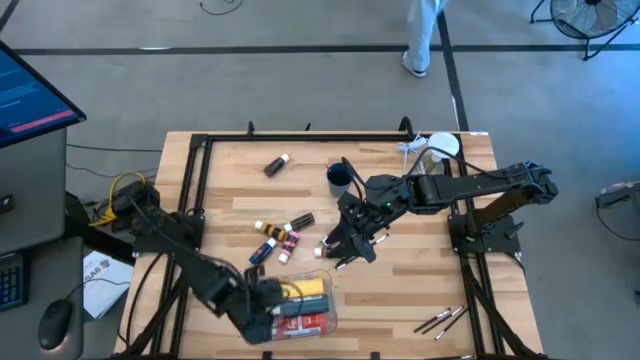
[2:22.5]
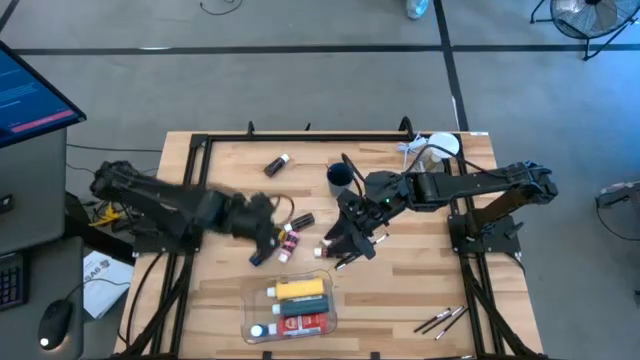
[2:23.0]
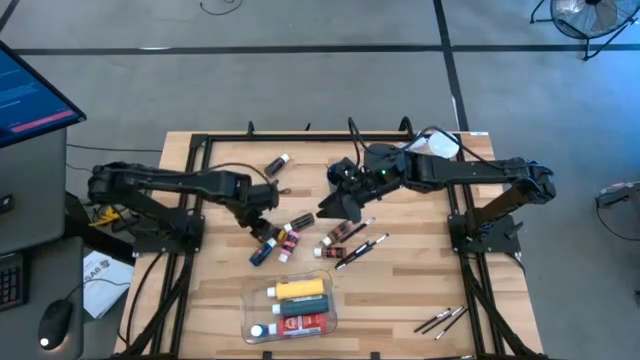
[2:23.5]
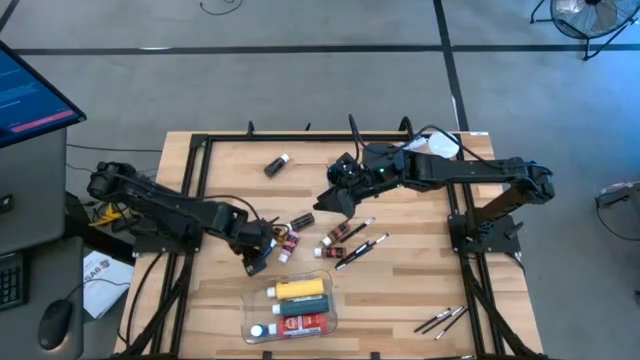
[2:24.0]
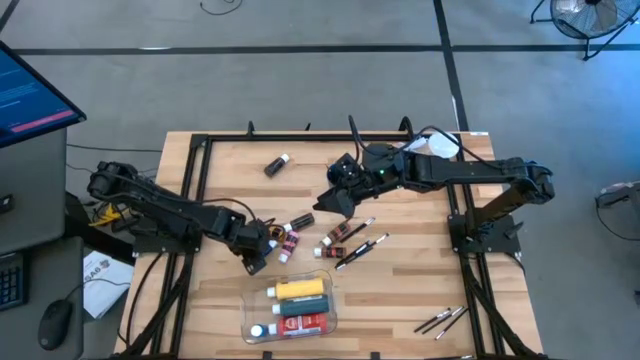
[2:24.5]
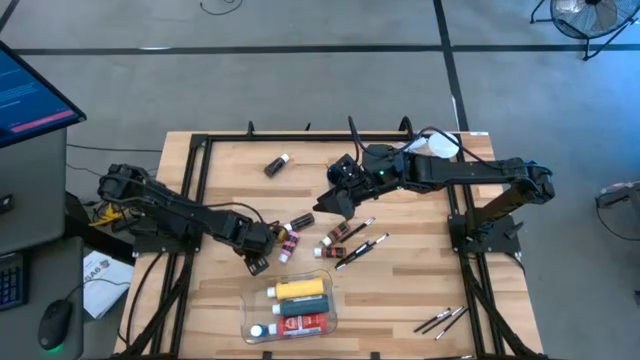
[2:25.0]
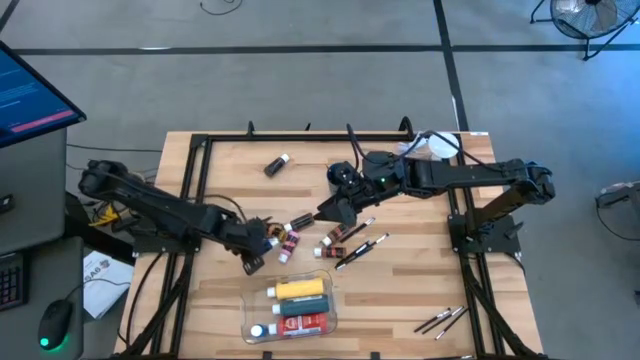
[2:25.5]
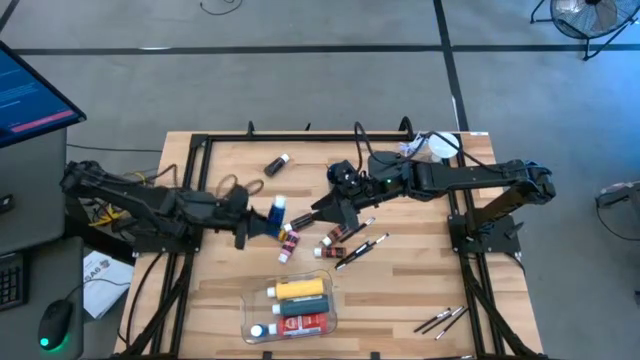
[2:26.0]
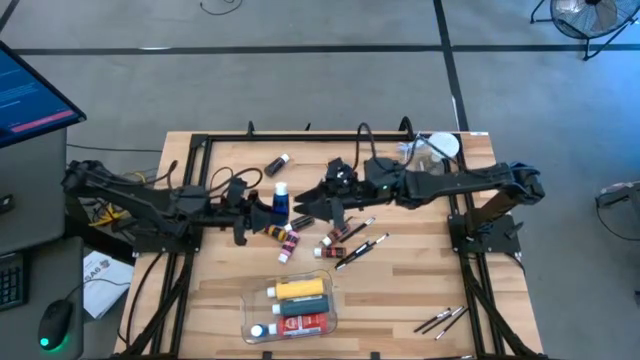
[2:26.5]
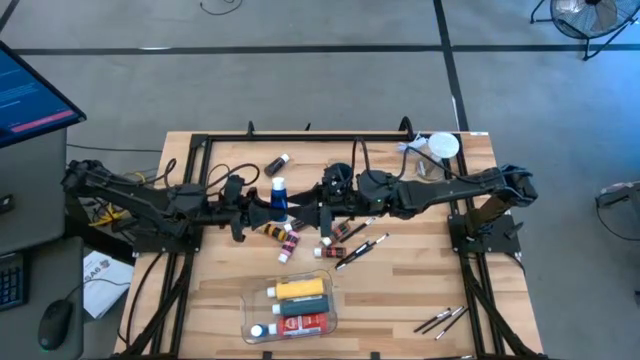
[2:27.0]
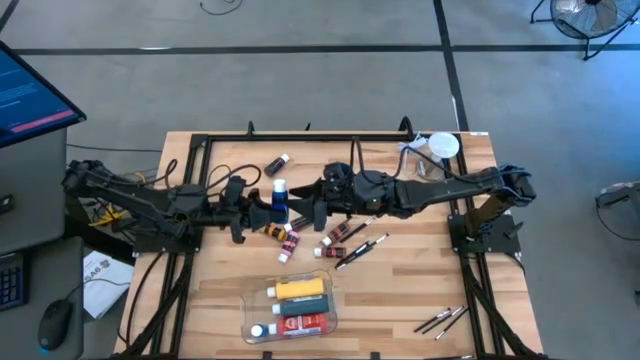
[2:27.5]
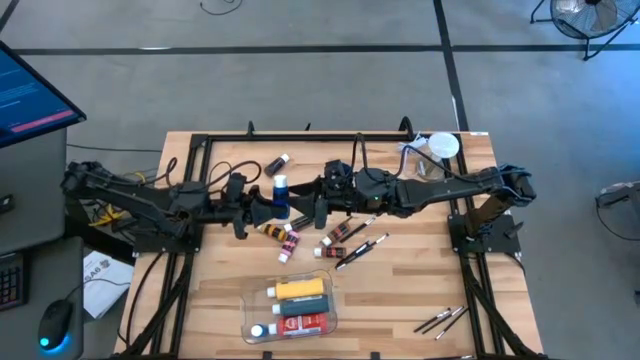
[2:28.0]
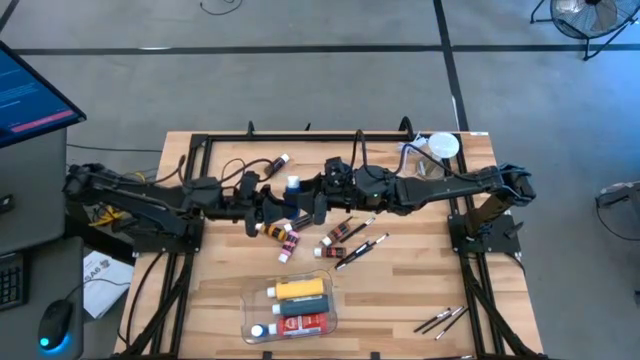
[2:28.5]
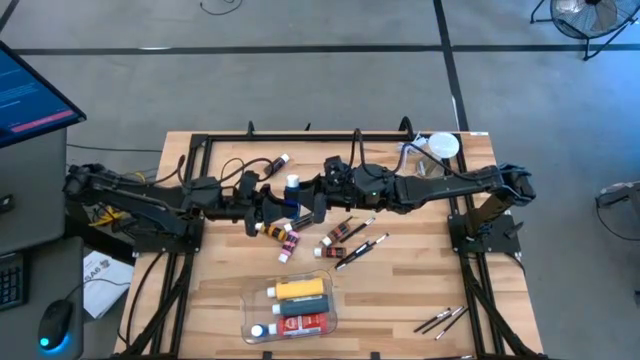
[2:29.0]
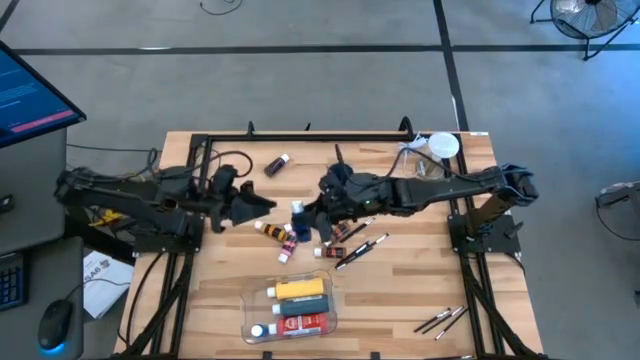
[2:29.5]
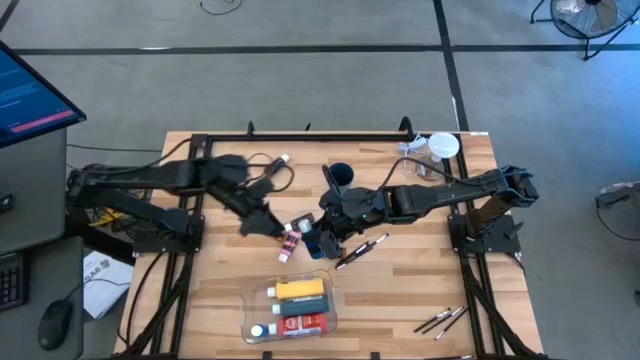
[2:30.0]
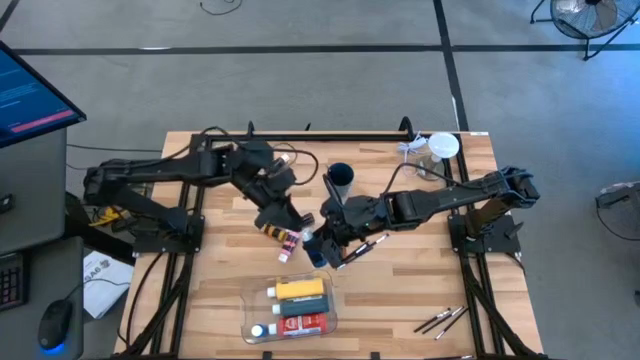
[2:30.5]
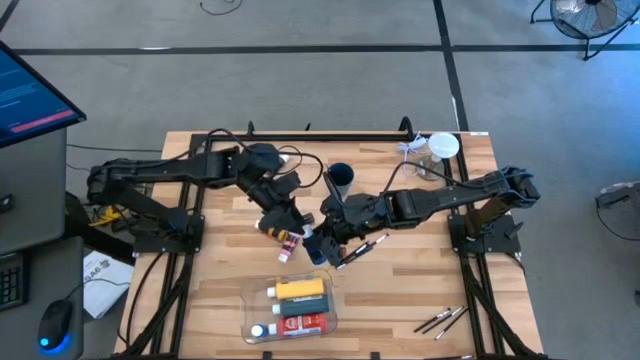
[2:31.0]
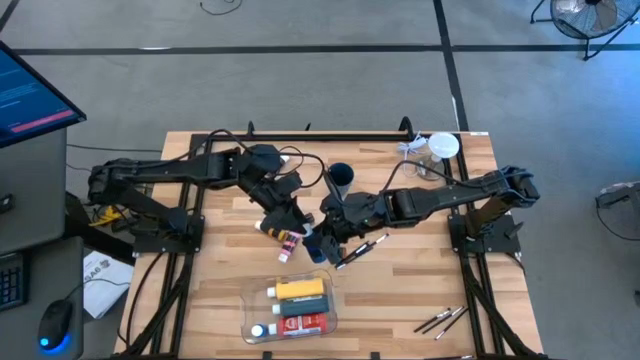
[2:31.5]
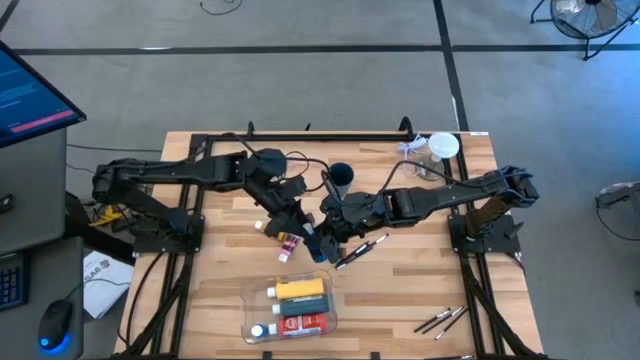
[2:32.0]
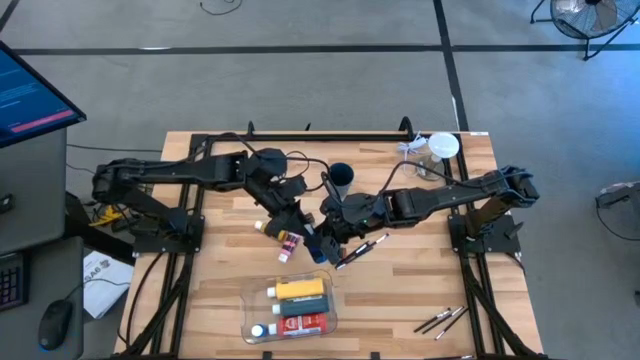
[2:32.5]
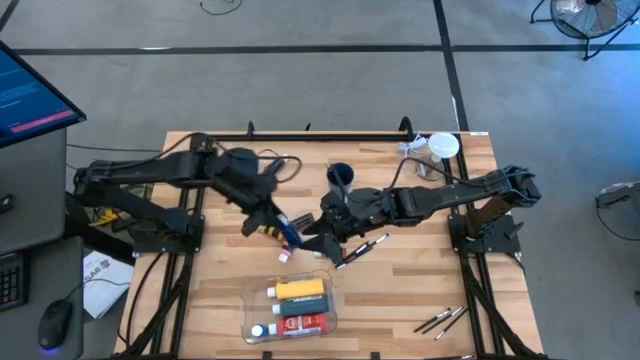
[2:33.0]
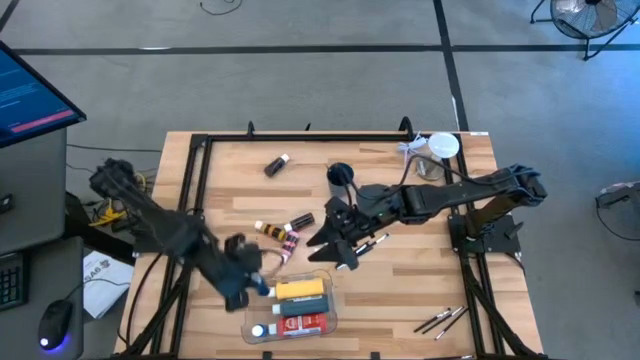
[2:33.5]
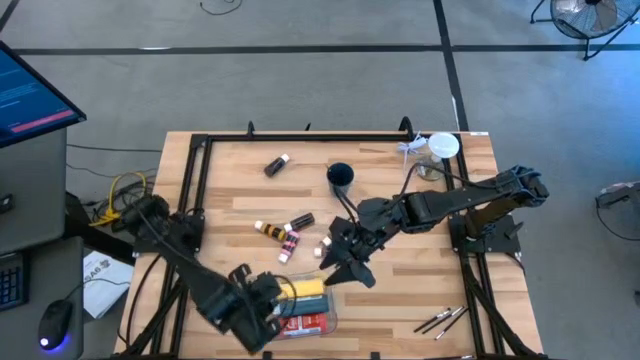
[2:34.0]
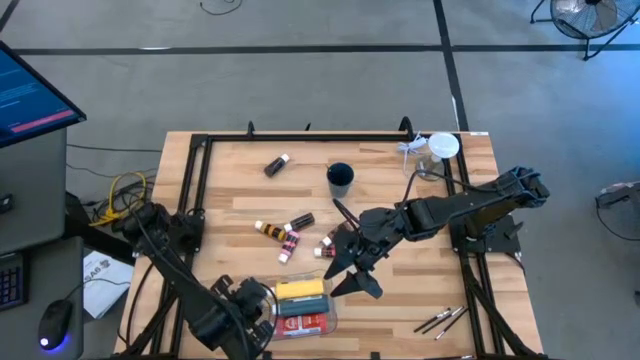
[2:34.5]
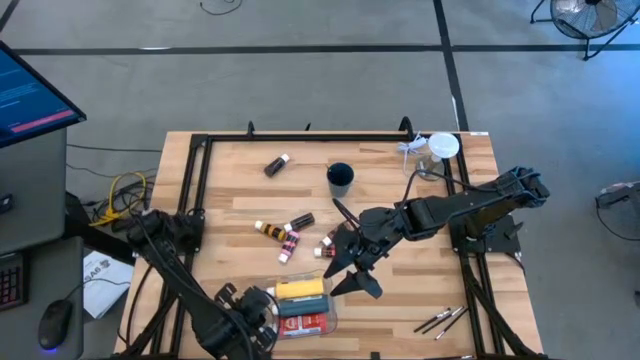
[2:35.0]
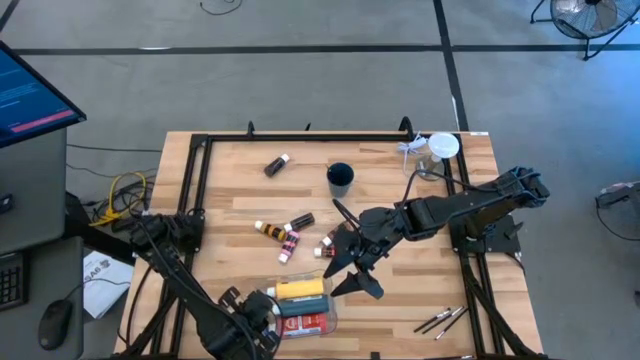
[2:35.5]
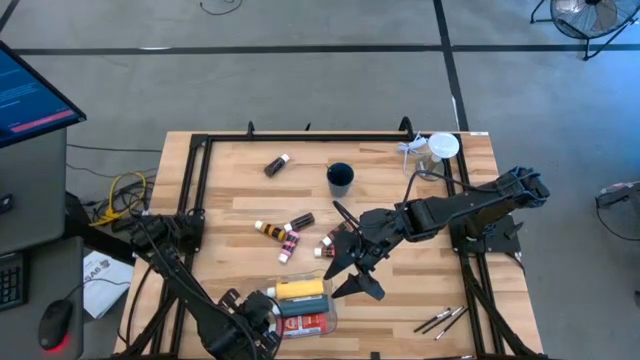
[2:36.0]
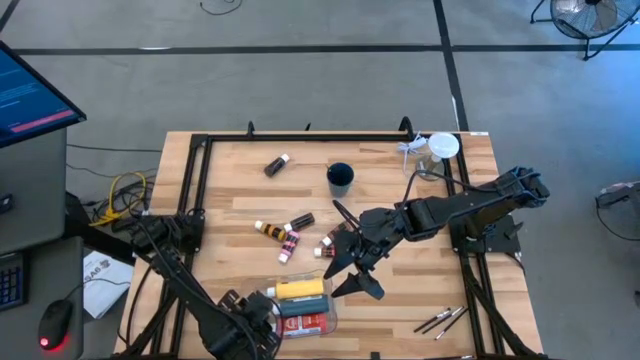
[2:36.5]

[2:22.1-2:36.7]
Task: Pick & Place Paint Supplies
Put the small blue paint bottle into the transparent bin

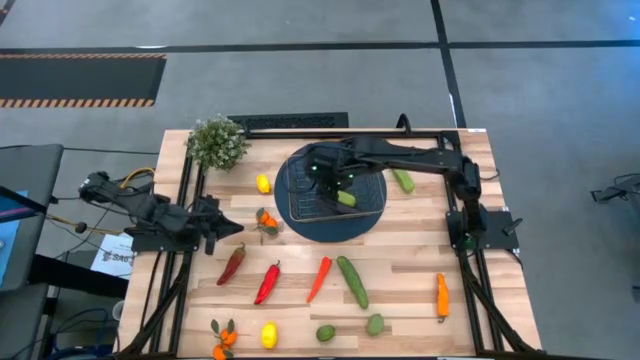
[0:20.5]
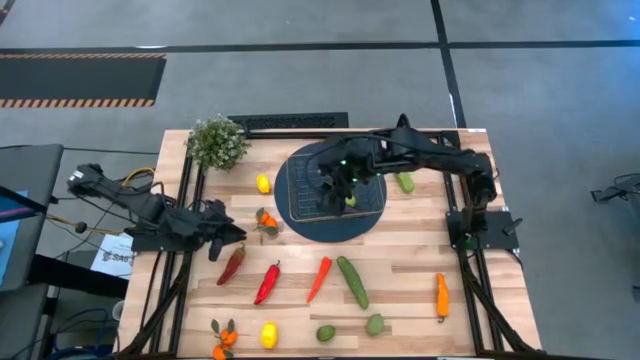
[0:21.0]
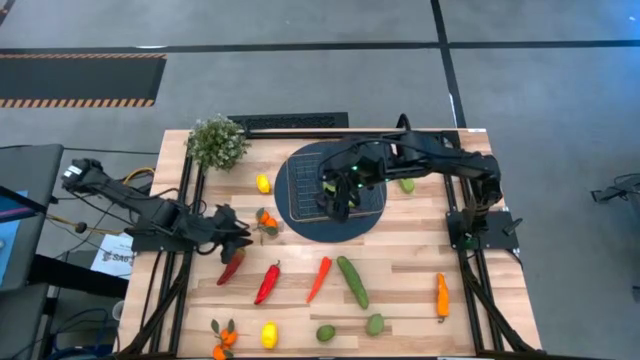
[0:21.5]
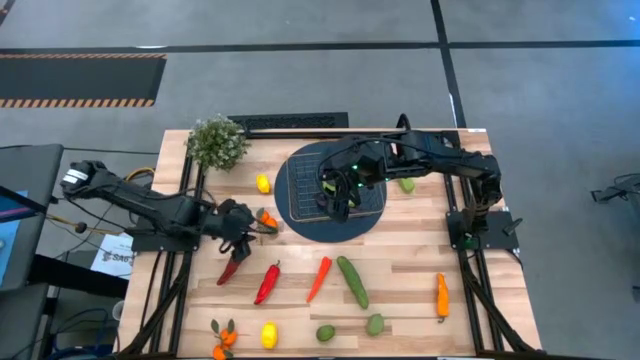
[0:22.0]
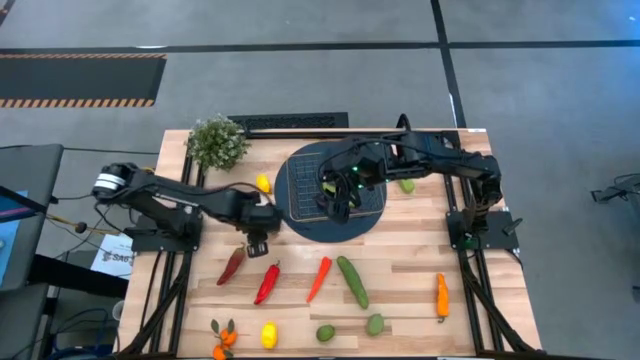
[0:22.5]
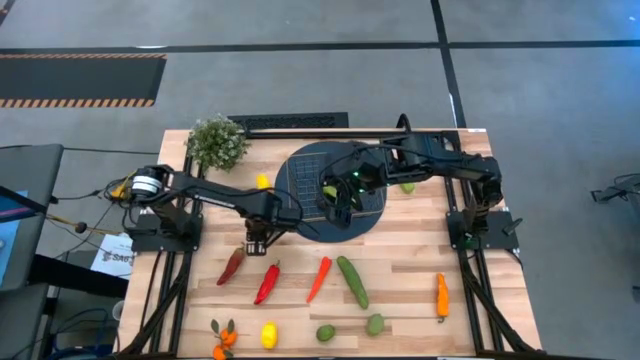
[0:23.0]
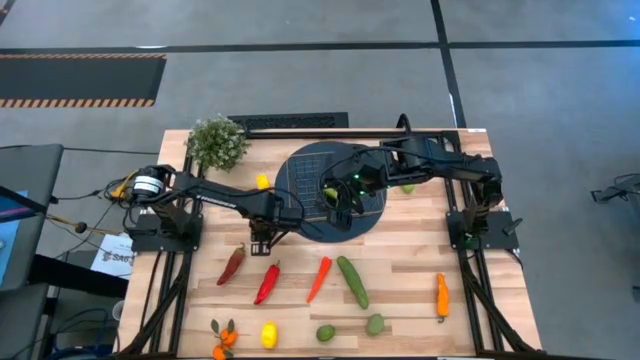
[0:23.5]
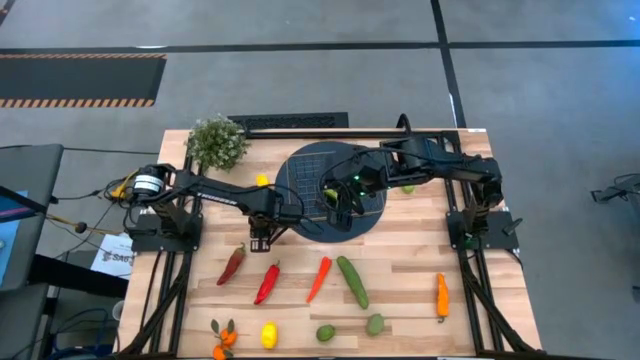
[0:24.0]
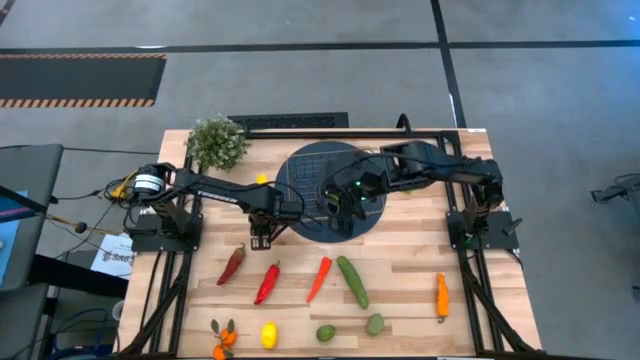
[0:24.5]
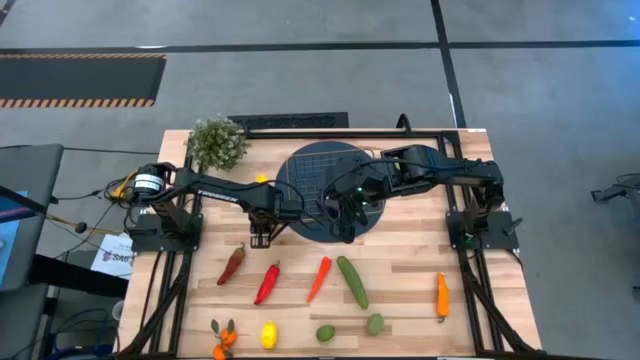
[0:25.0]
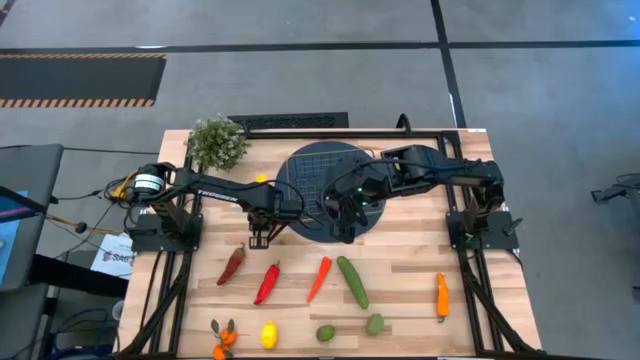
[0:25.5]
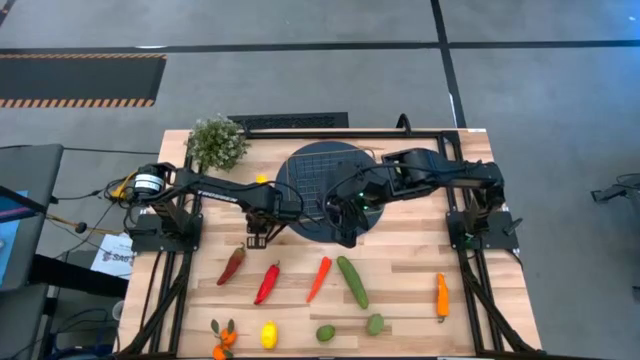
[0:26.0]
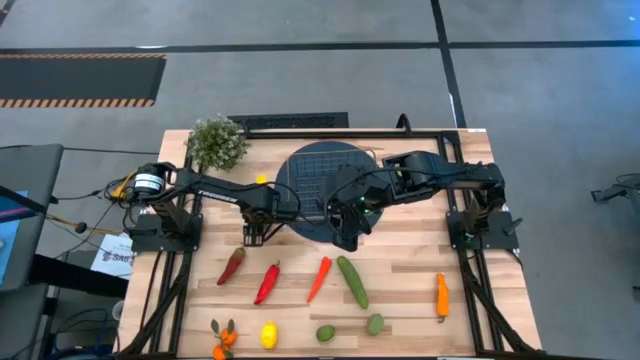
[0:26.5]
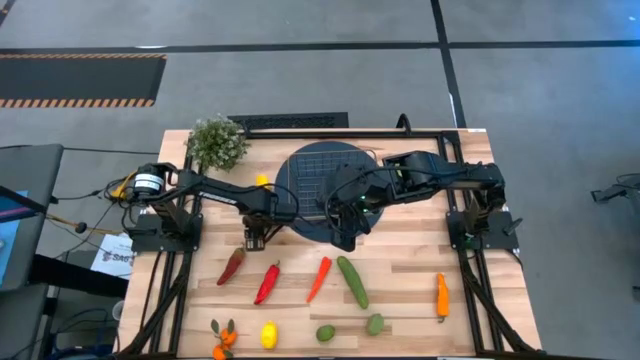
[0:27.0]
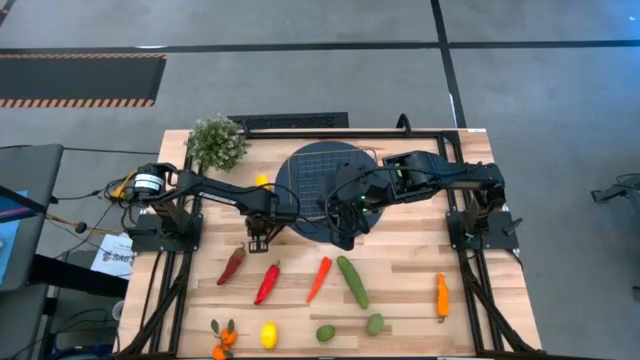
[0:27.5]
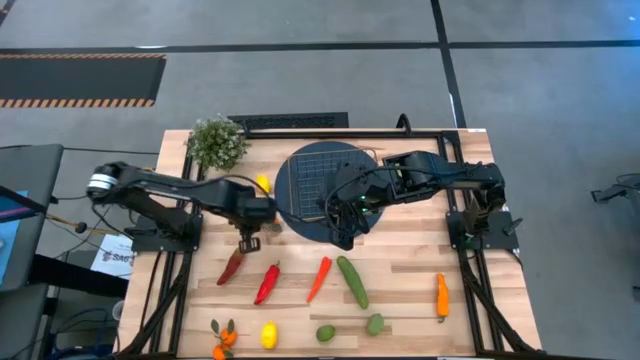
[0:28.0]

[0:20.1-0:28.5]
Task: Build produce basket
Put the top oranges into the basket
